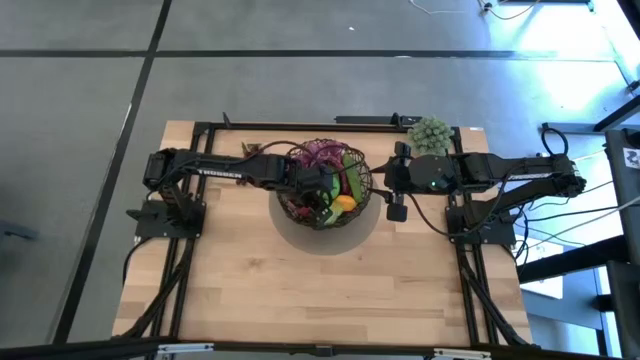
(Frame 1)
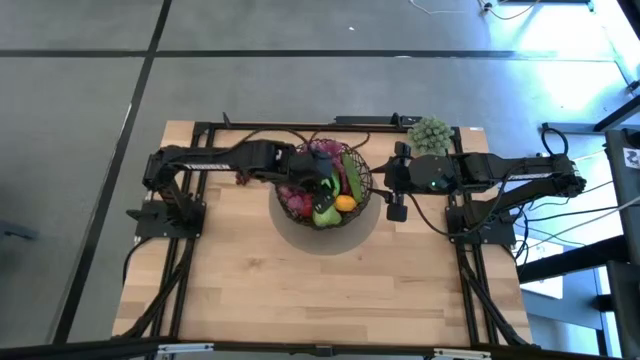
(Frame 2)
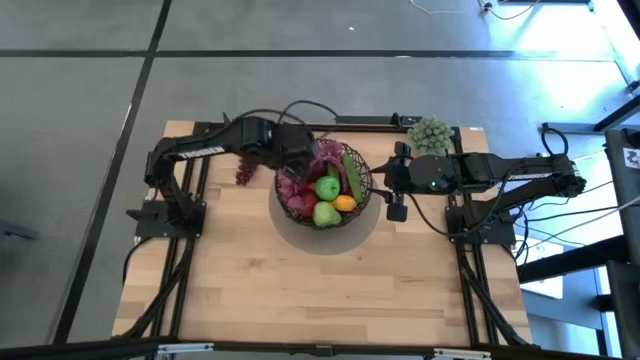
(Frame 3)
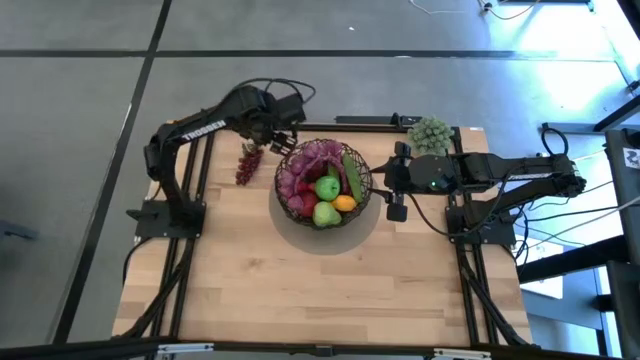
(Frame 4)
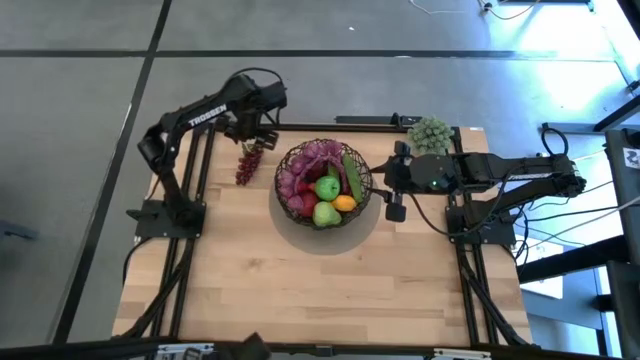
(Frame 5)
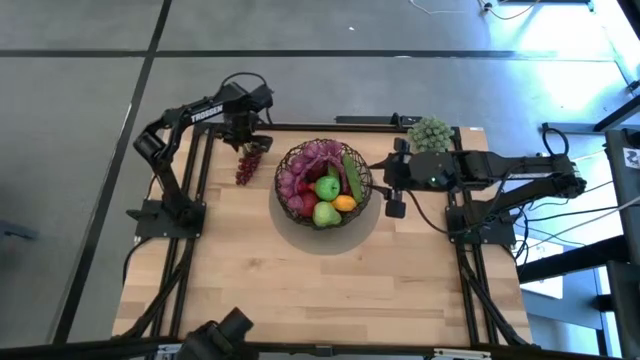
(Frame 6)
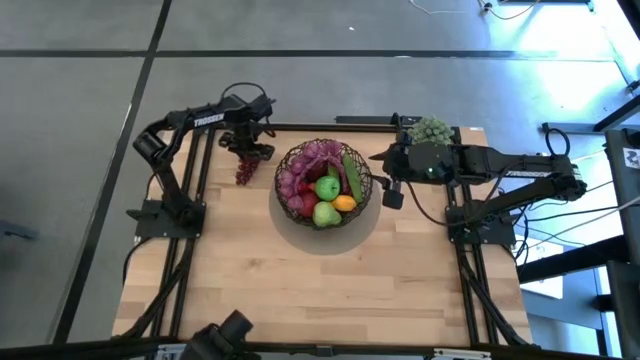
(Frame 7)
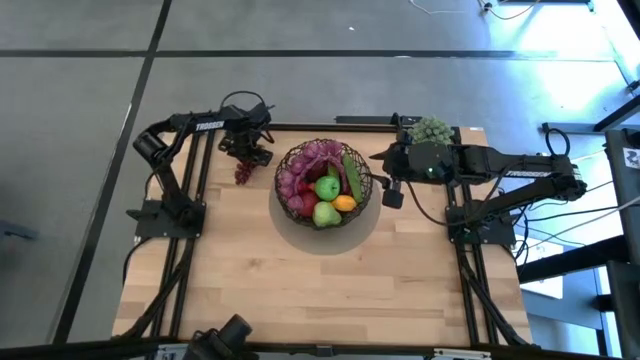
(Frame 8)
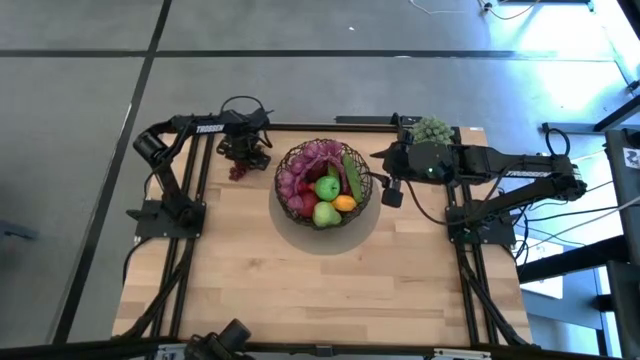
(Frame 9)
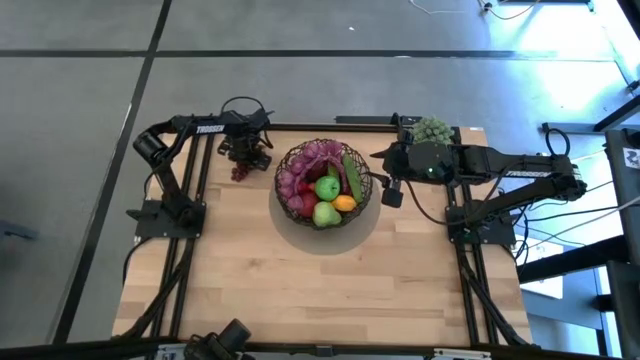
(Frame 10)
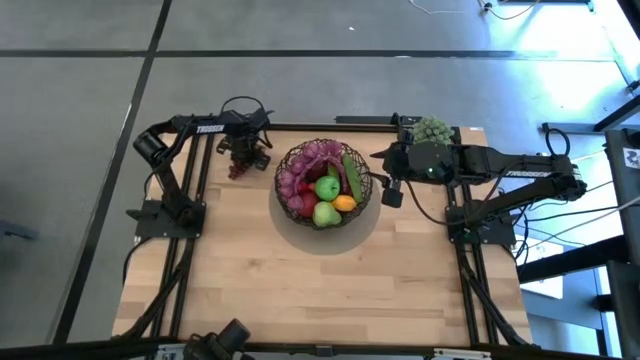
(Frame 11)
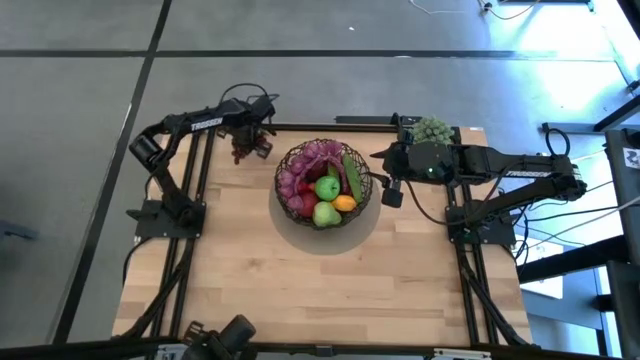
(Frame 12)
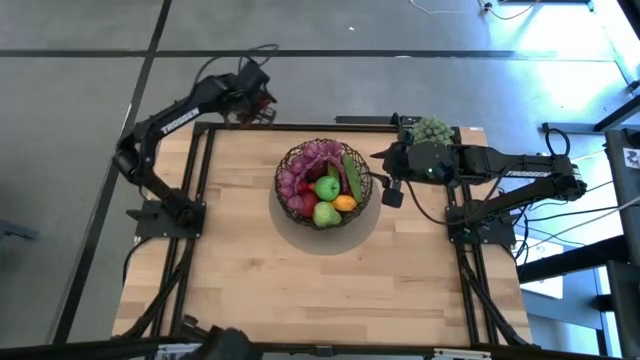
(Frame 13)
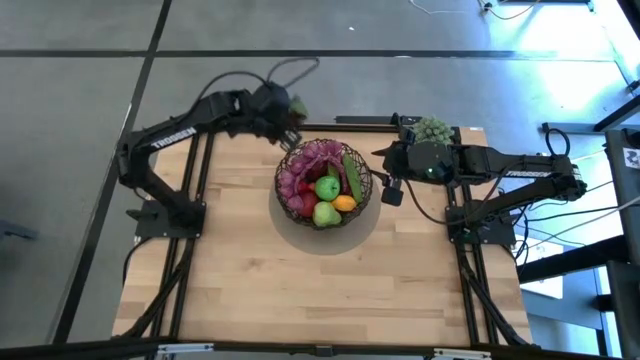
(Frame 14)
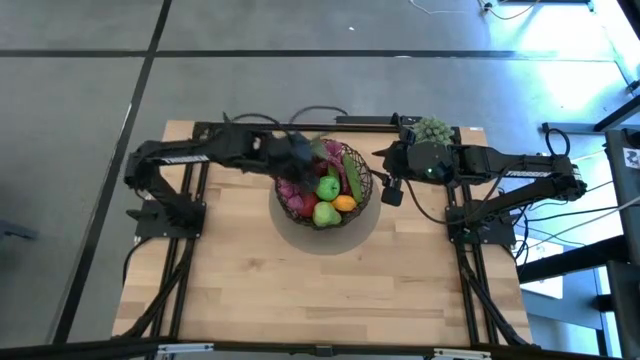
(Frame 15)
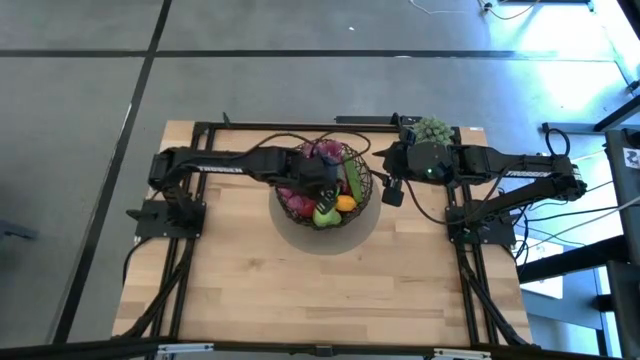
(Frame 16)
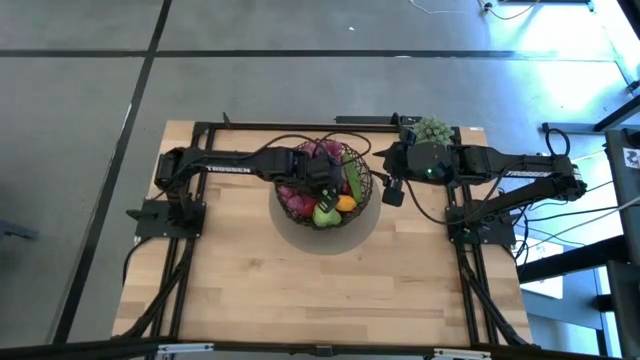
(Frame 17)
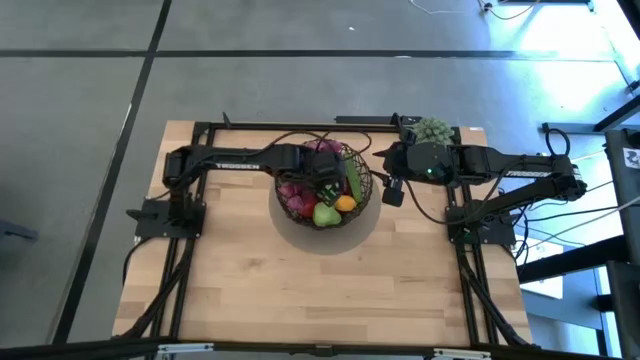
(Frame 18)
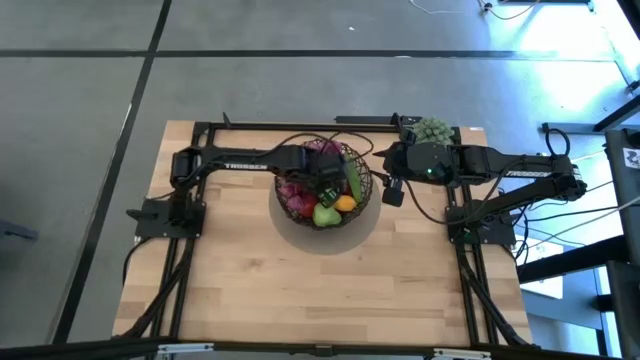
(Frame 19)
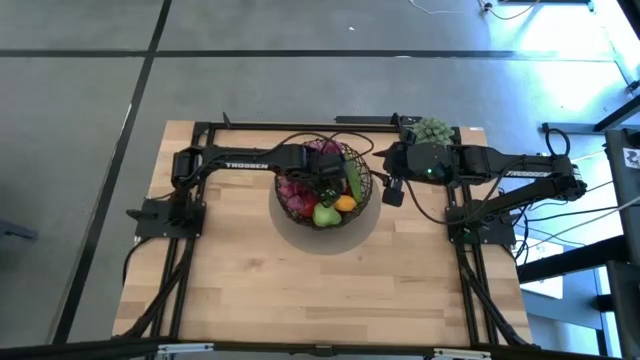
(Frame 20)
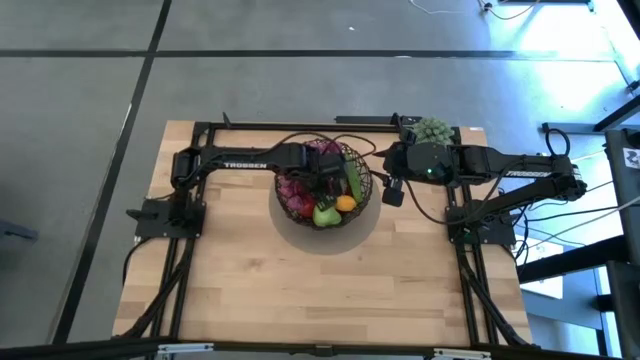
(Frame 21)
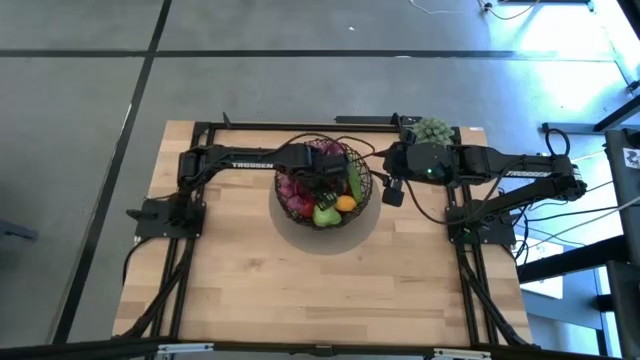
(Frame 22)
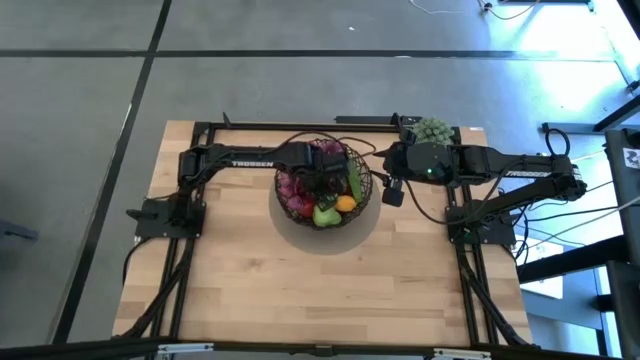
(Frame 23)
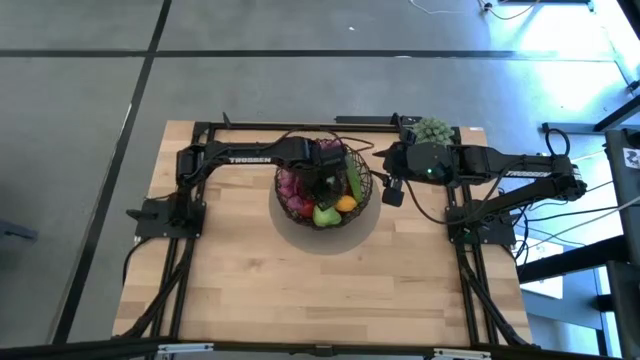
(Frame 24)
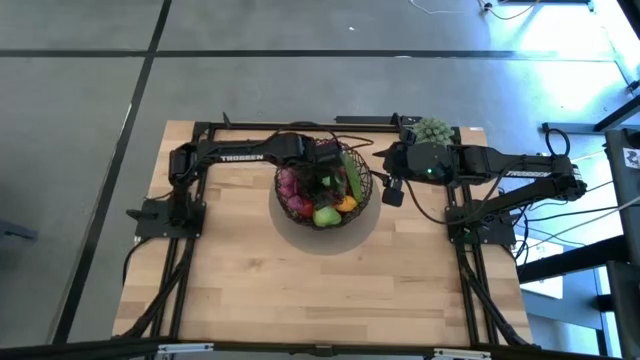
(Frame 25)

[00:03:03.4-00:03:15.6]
Task: Build produce basket
Put the grapes into the wire basket

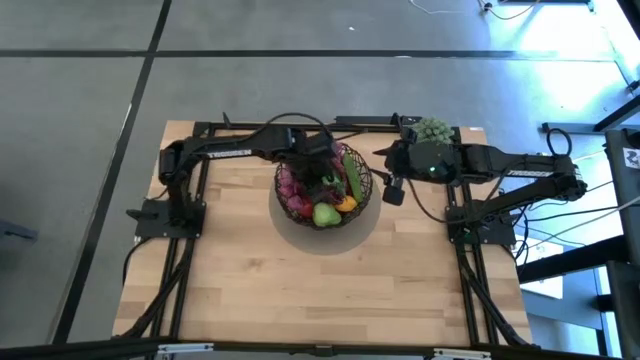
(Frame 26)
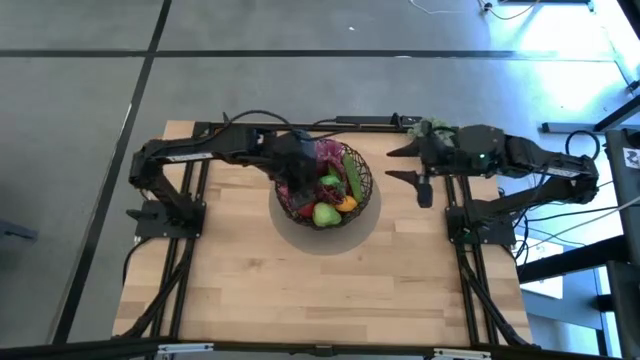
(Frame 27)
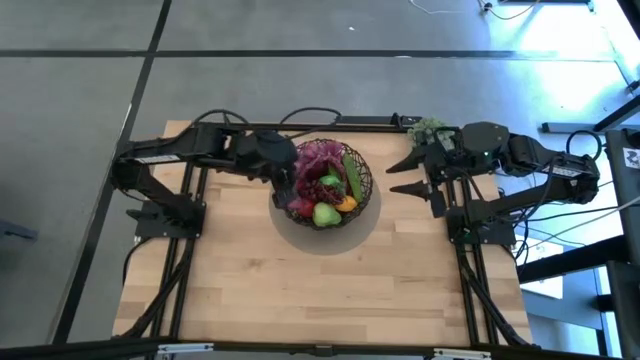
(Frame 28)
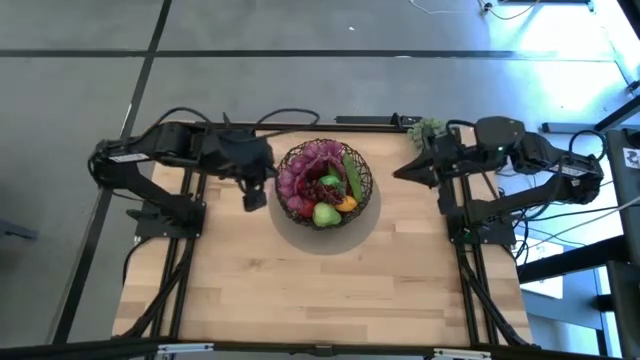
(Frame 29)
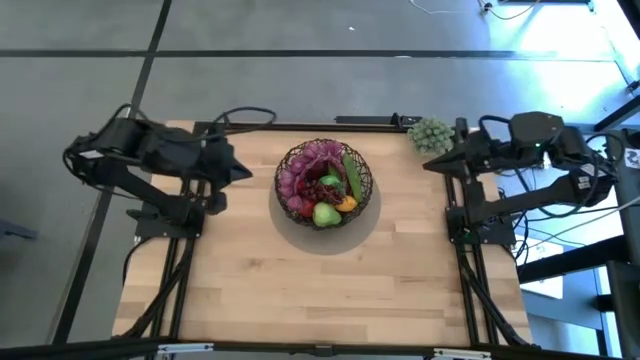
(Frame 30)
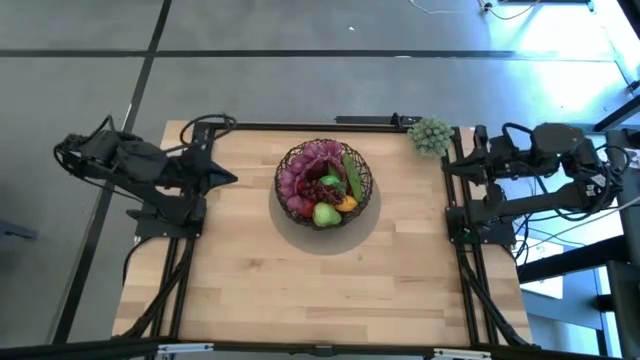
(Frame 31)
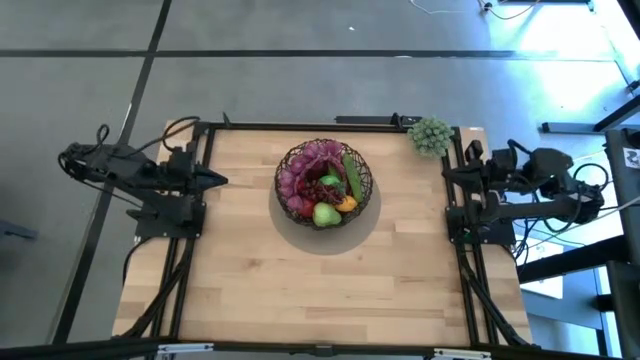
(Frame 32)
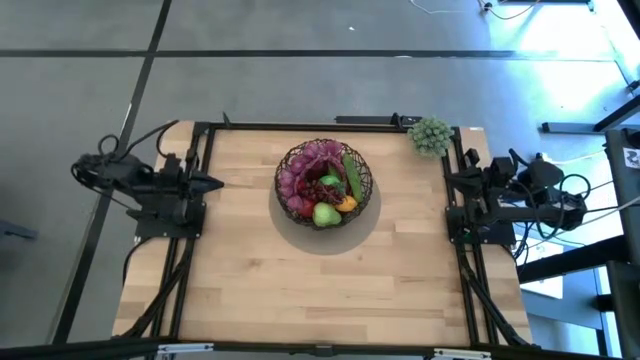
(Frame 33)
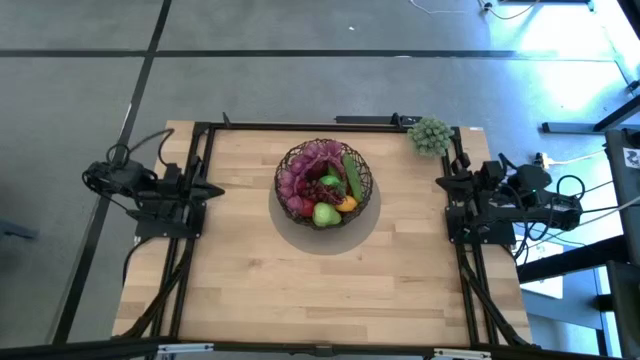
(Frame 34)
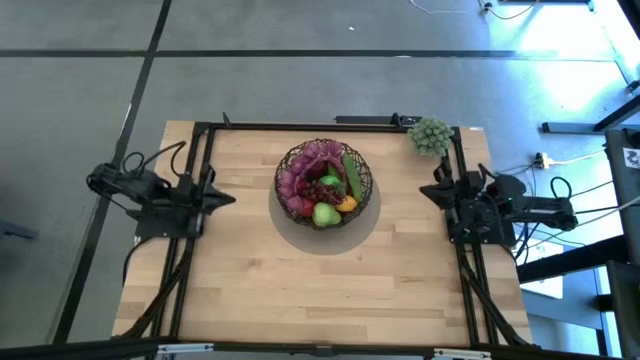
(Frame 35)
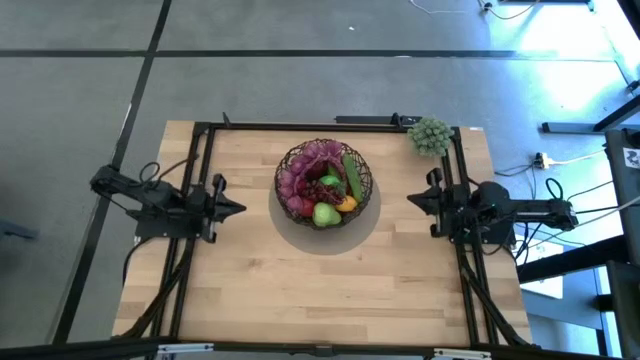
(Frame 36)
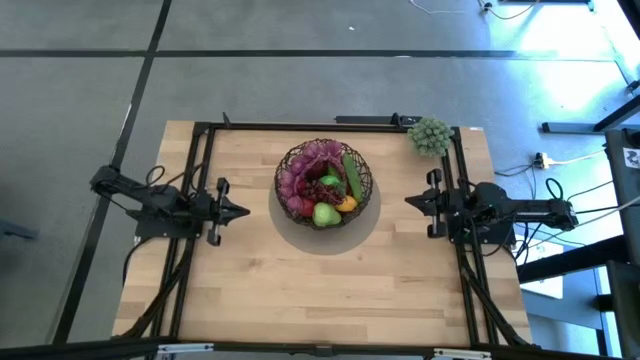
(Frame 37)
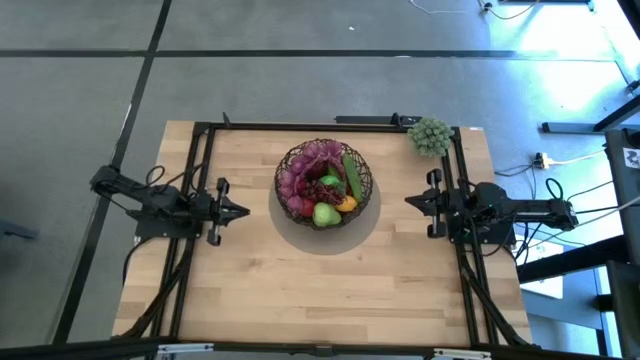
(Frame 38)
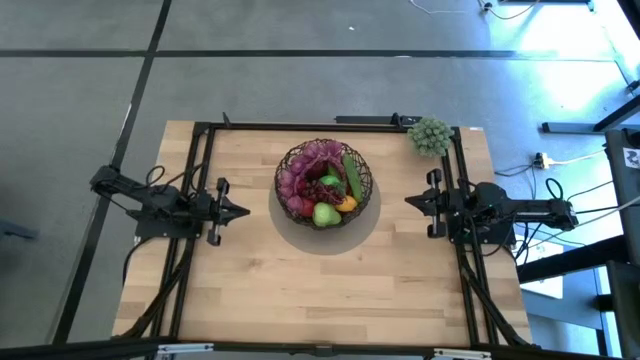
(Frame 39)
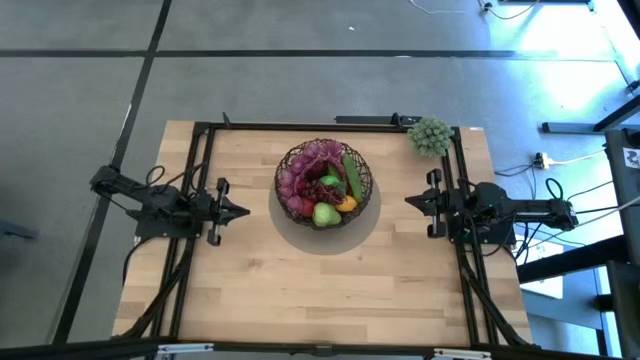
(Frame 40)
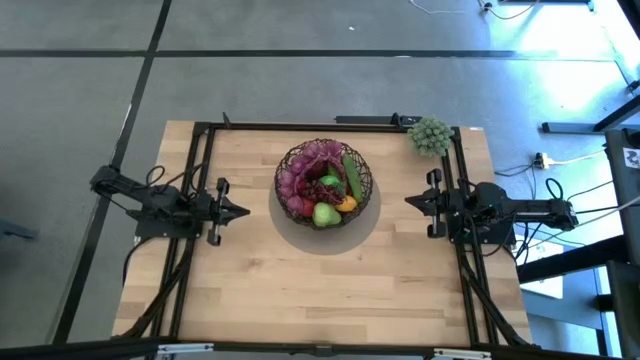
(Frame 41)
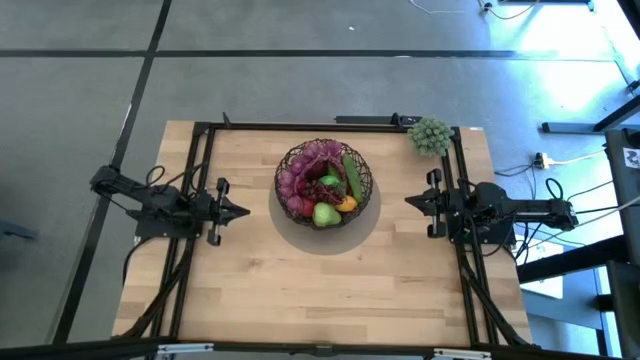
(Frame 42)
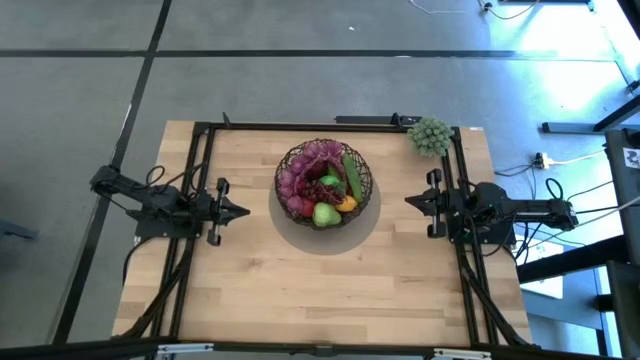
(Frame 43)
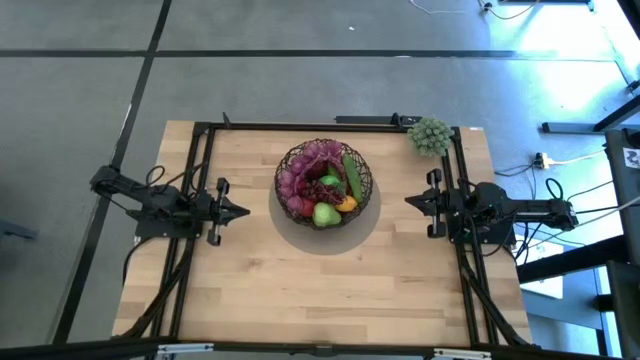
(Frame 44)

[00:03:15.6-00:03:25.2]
Return to Home Position
